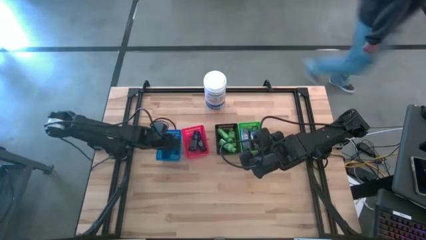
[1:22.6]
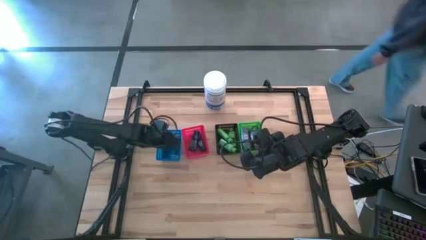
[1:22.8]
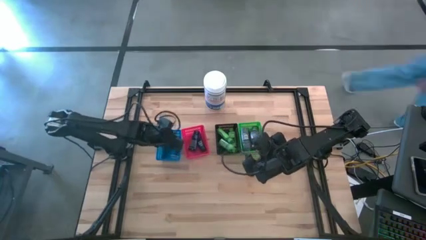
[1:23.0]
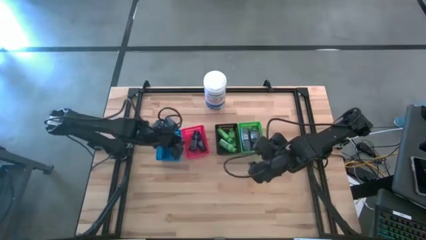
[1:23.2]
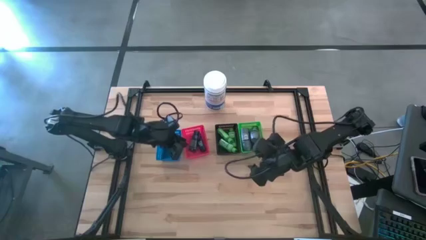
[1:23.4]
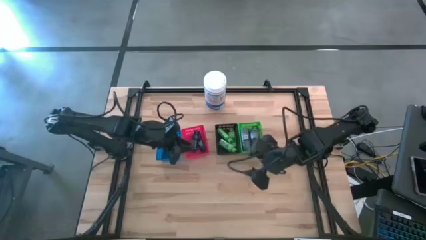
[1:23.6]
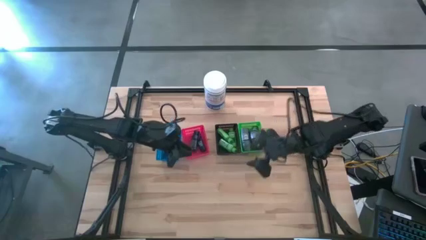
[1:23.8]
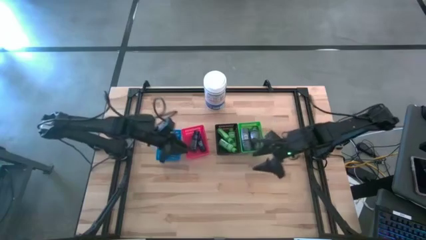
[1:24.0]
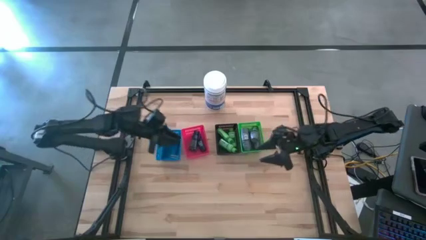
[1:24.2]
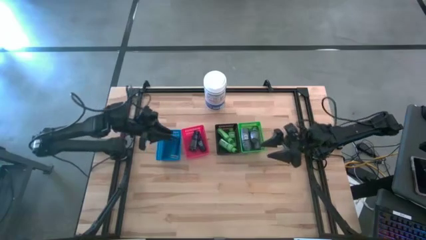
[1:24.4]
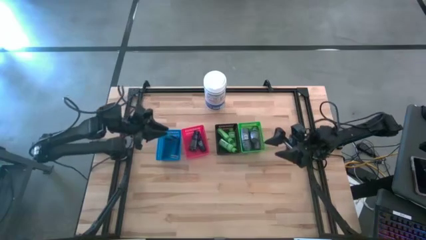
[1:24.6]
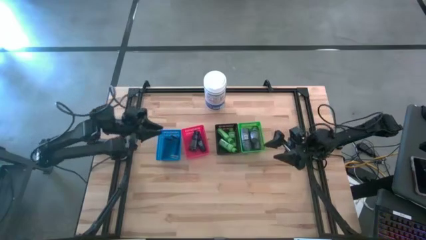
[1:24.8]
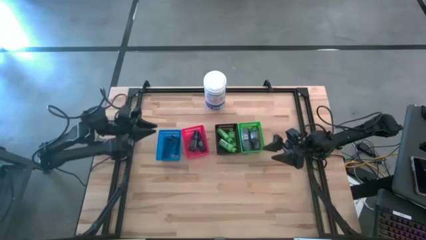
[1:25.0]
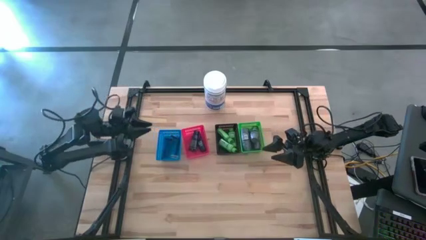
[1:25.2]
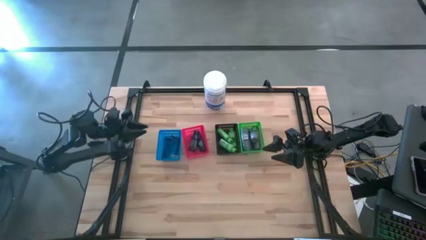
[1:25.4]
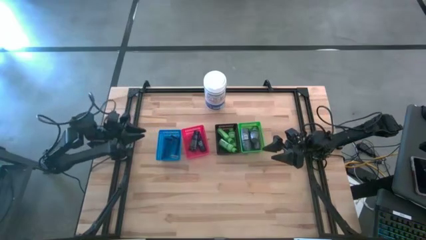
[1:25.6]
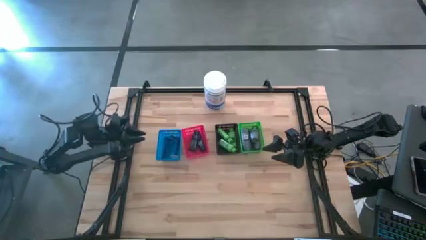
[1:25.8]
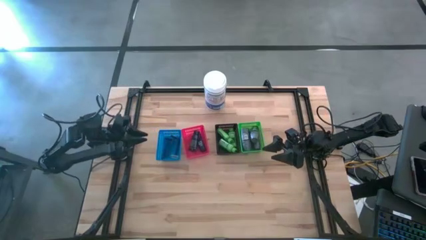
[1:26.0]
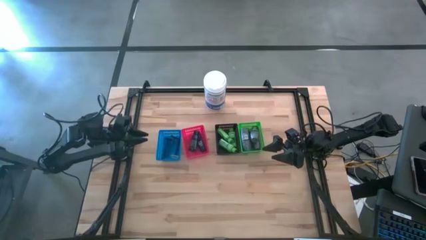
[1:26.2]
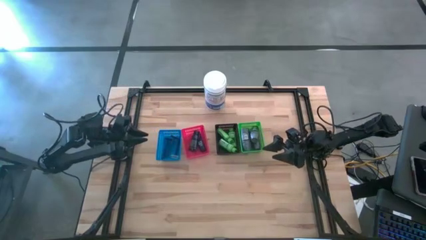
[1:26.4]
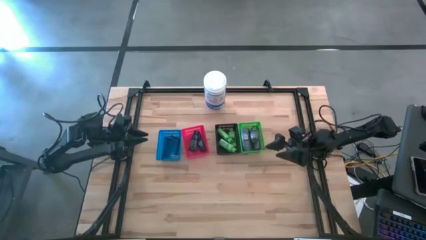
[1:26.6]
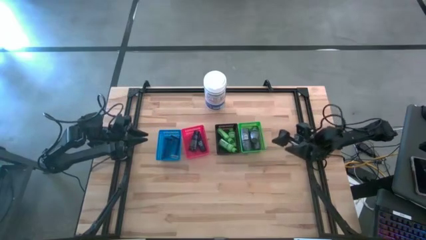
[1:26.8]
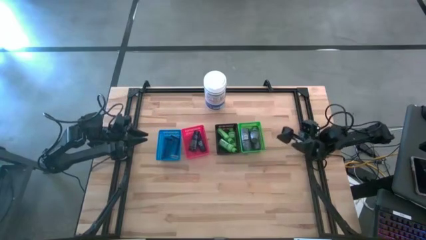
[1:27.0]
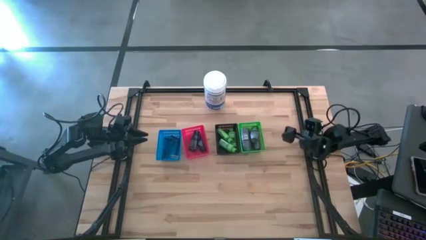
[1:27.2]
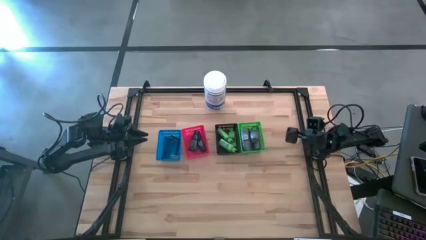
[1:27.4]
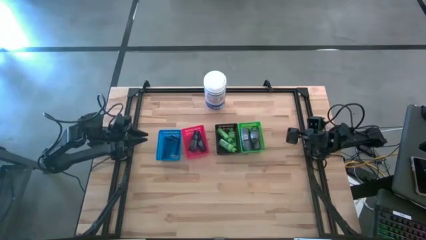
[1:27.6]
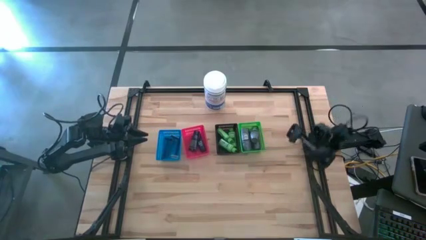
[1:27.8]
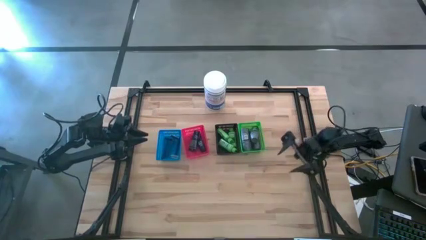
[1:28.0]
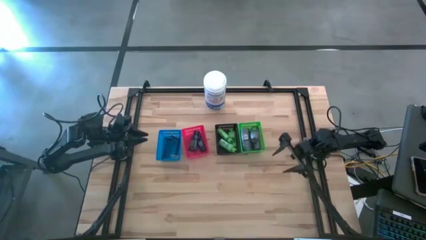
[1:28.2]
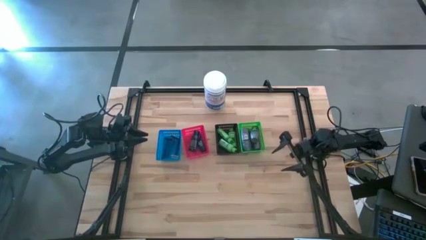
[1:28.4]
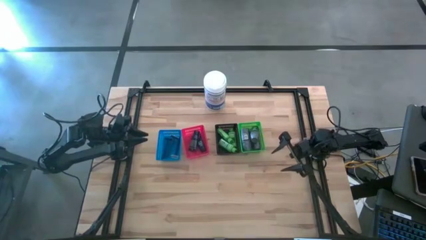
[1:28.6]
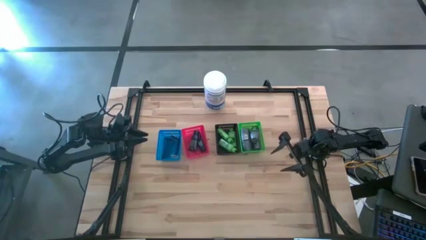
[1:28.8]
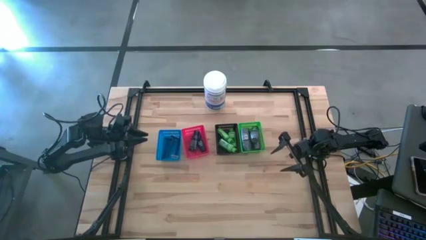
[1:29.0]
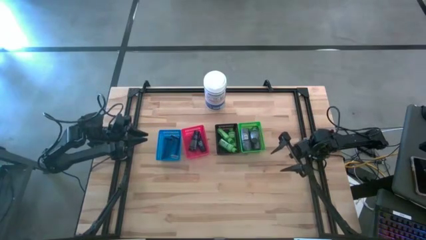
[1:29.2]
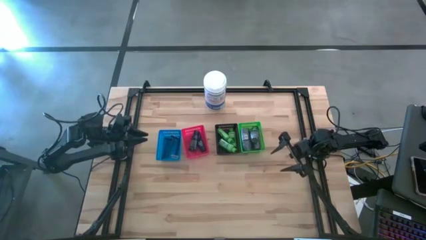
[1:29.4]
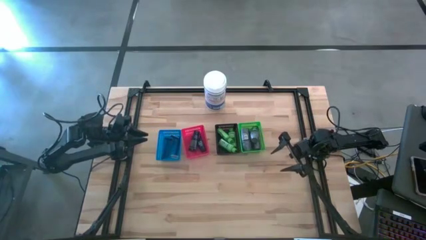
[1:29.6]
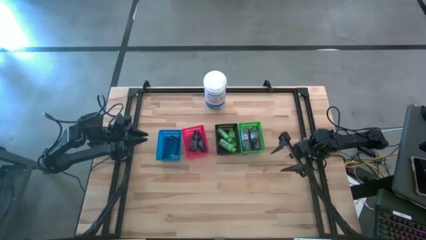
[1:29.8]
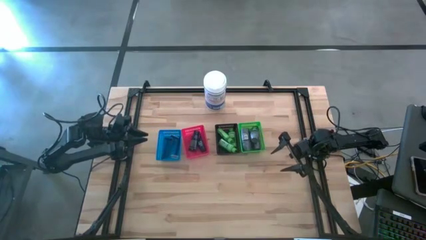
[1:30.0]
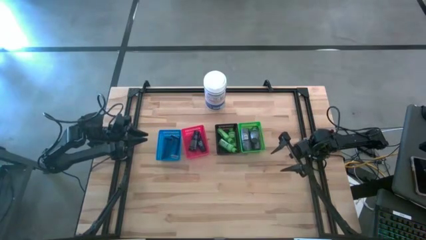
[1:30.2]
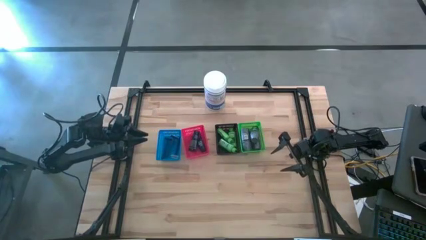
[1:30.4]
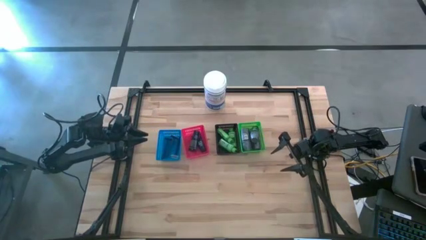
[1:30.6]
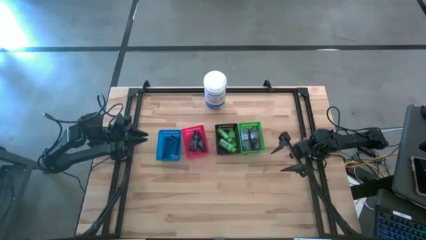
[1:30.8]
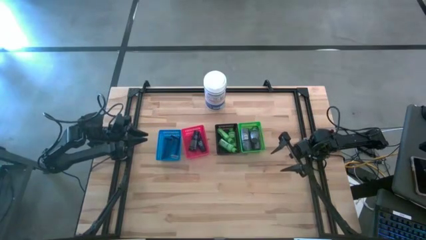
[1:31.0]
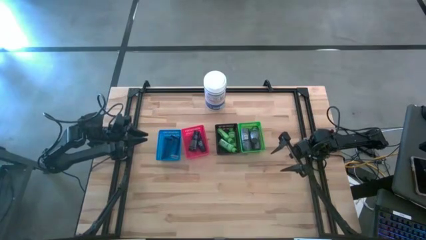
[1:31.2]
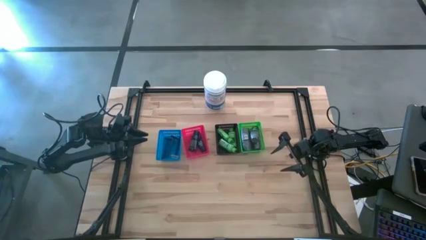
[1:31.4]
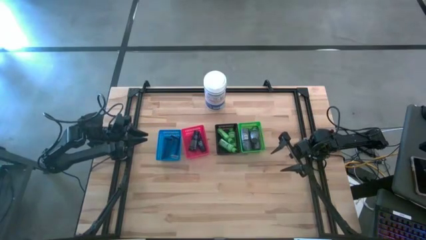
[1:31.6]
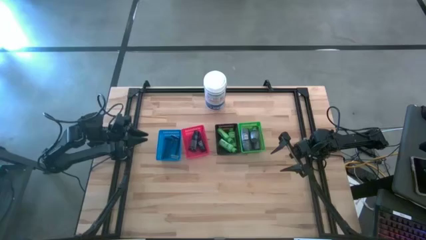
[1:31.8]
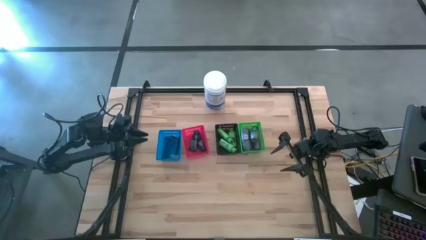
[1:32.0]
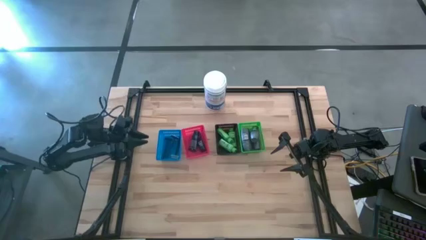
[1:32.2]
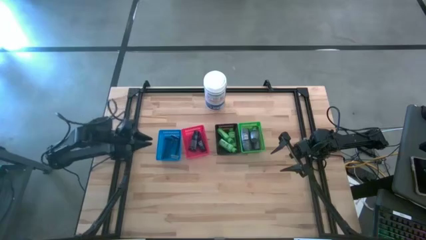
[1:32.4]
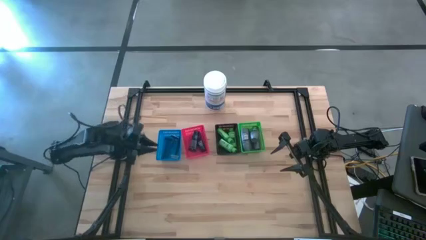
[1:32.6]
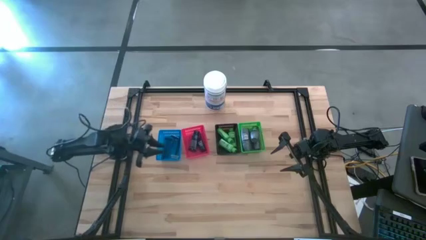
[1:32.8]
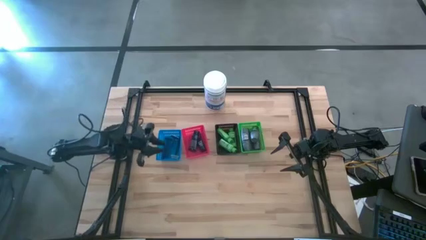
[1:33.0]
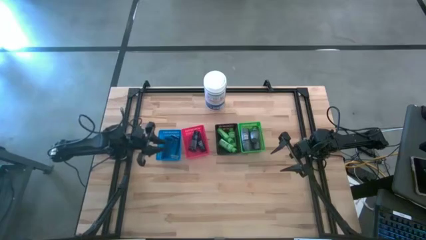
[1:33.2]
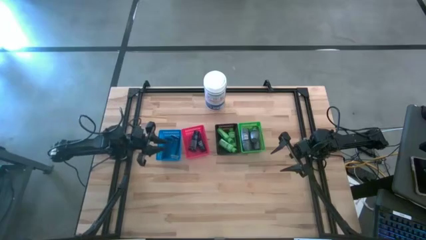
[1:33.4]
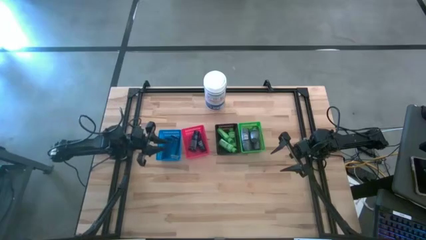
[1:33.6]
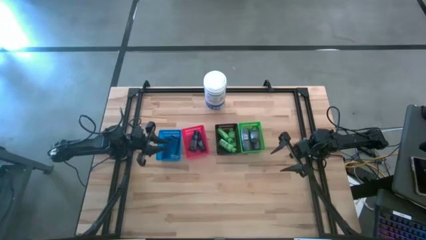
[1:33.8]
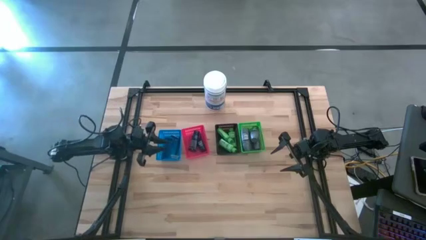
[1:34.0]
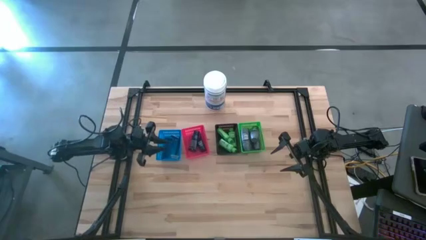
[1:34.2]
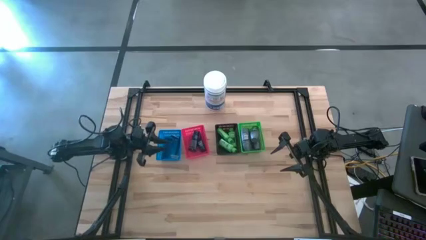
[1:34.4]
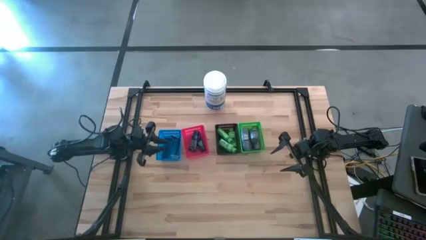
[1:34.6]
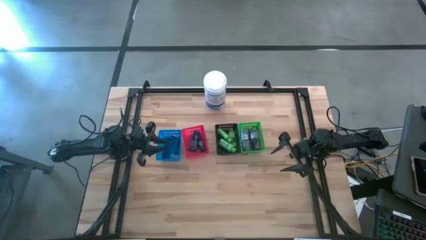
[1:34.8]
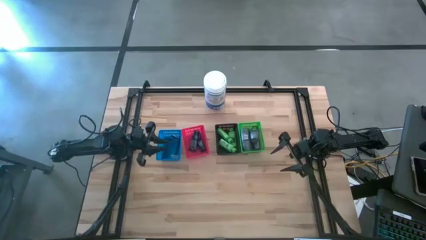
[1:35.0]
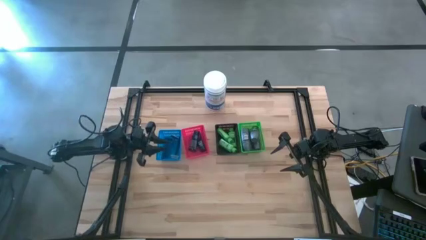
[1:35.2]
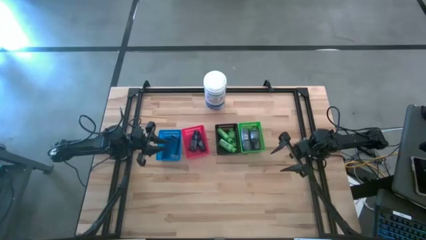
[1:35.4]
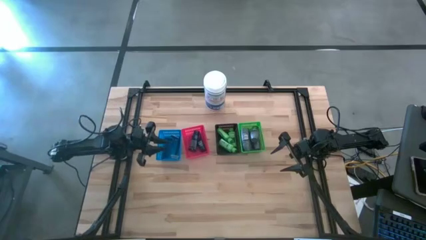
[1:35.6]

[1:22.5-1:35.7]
Task: Pick & Place Travel size toiletries
Return to Home Position

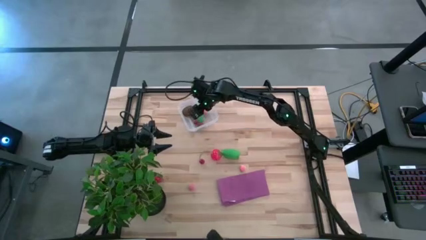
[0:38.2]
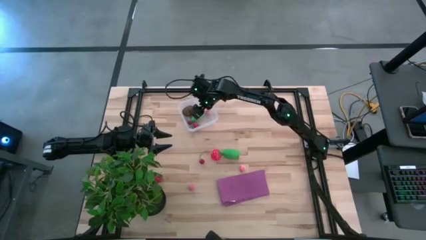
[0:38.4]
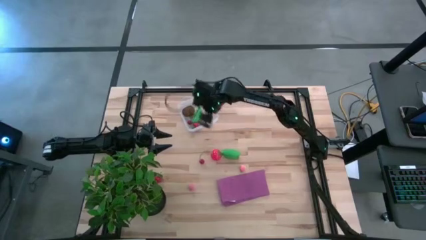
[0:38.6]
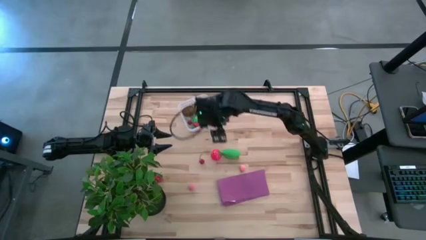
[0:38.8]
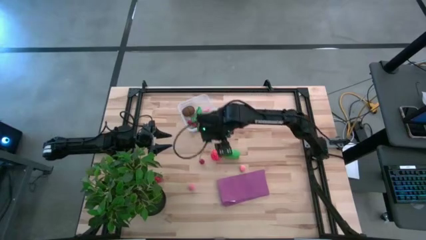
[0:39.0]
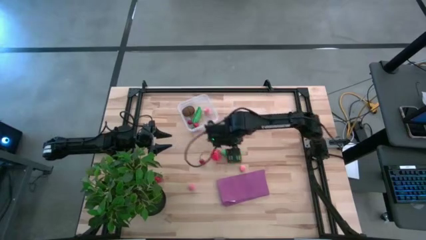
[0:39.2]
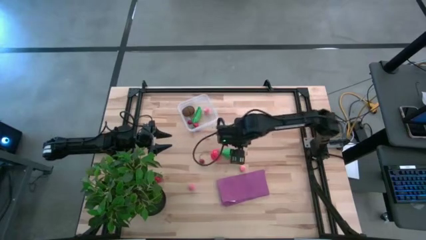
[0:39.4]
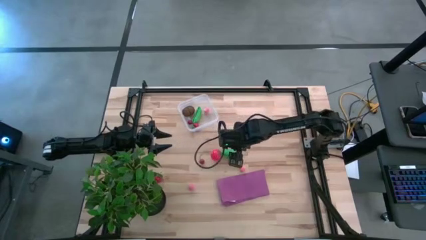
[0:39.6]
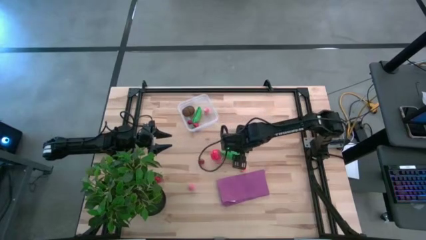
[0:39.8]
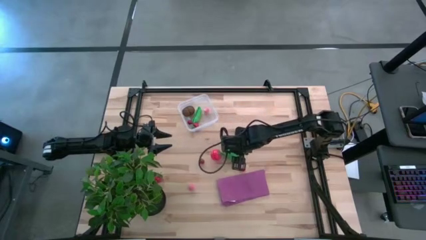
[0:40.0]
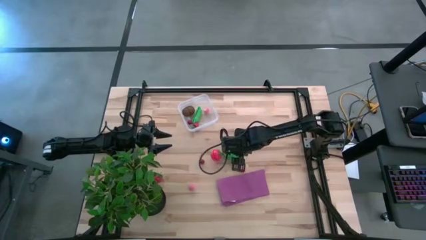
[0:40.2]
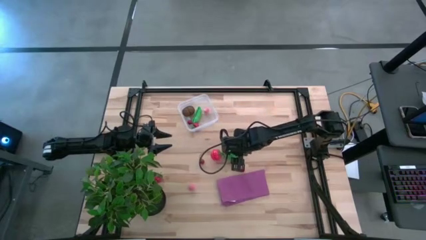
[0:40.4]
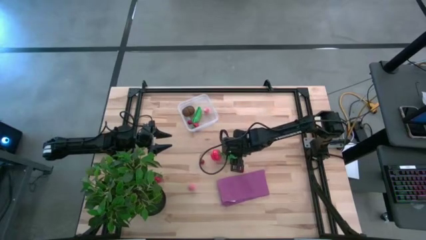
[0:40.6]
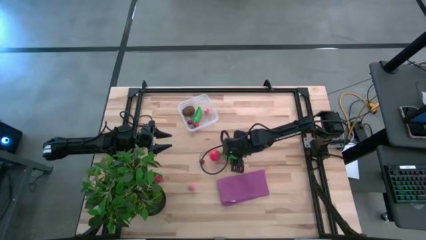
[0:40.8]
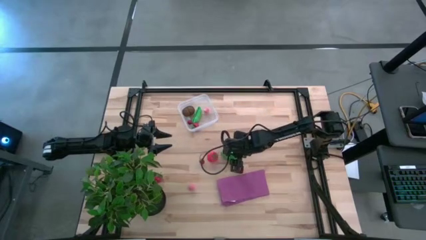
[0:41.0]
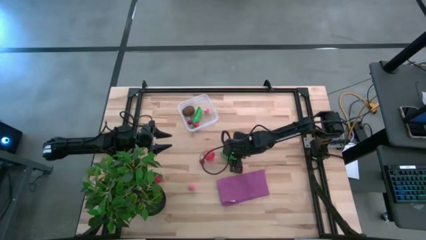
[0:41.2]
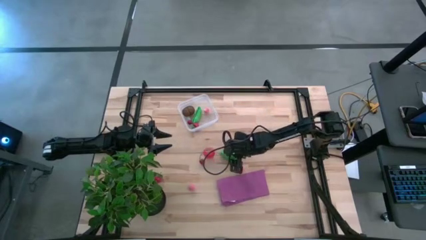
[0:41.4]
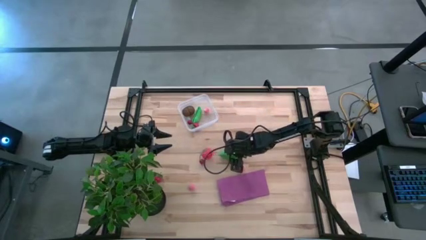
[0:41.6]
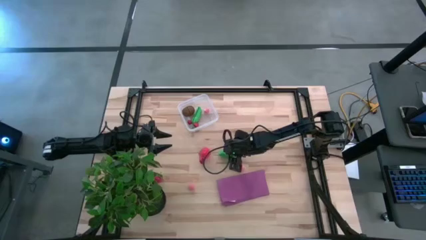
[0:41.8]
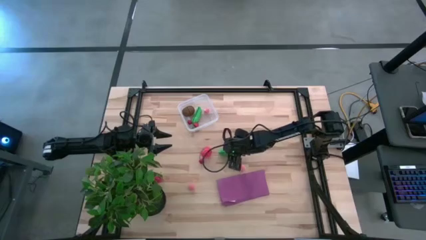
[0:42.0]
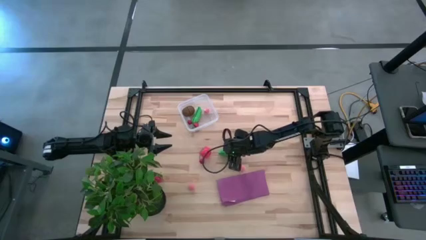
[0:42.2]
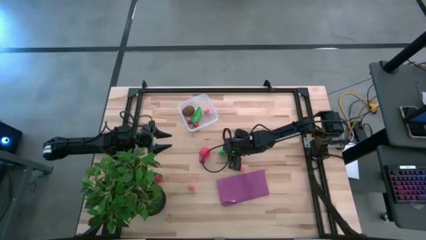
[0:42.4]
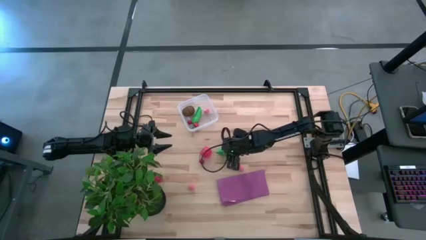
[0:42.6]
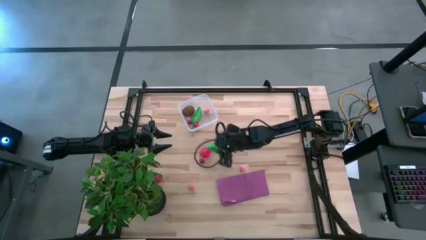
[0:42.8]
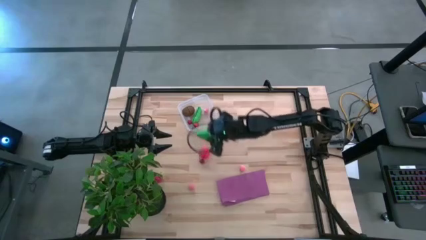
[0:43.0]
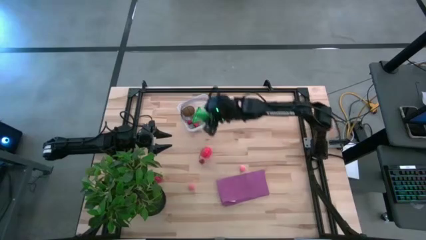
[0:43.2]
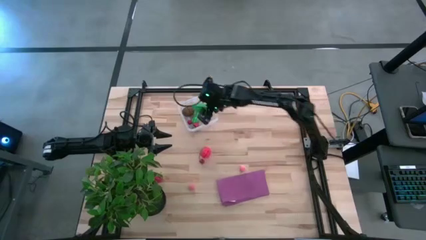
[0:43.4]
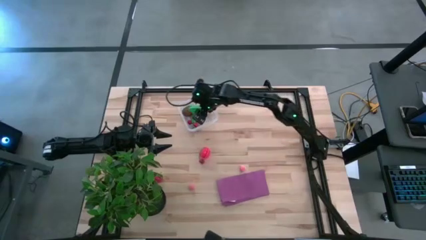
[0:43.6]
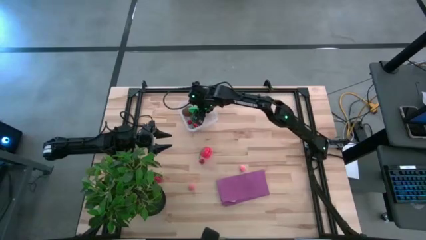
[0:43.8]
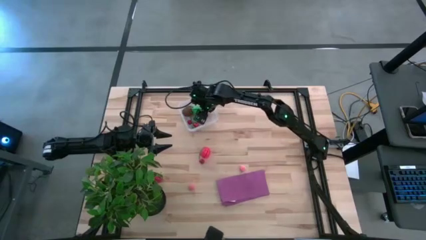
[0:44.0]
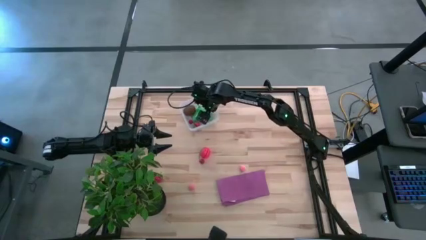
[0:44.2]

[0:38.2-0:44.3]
Task: Pick and placing Produce into tupperware
Put the green corn into the transparent bin
